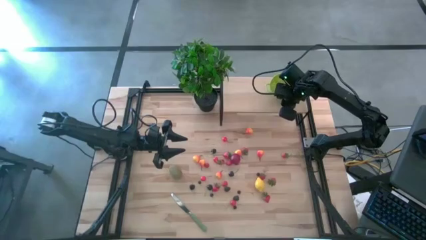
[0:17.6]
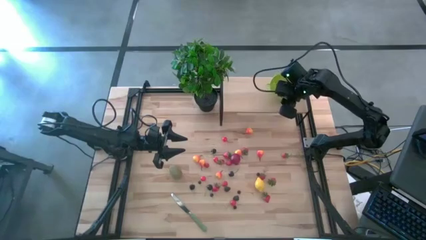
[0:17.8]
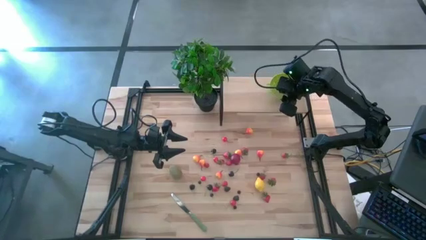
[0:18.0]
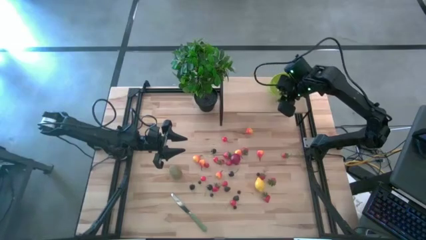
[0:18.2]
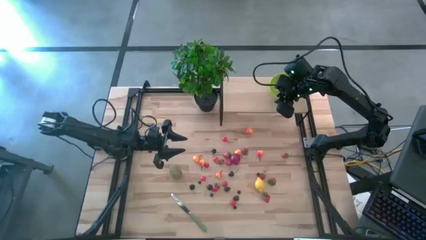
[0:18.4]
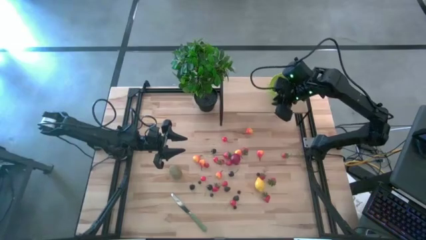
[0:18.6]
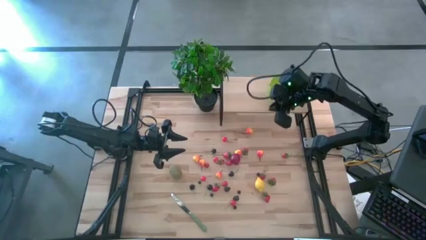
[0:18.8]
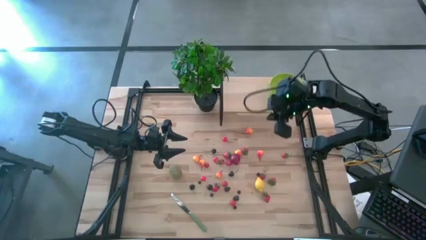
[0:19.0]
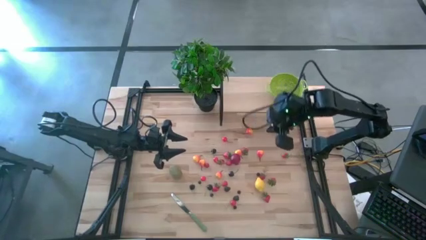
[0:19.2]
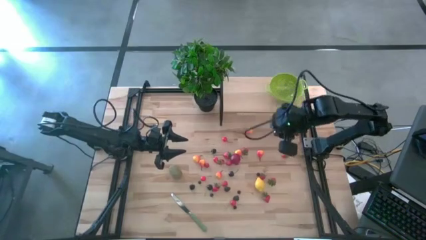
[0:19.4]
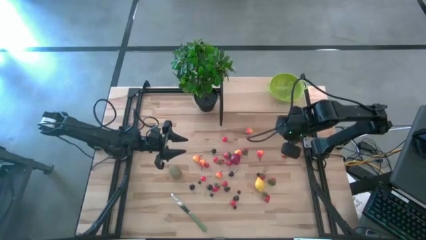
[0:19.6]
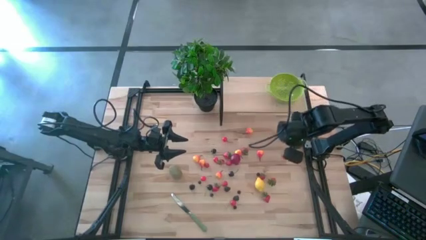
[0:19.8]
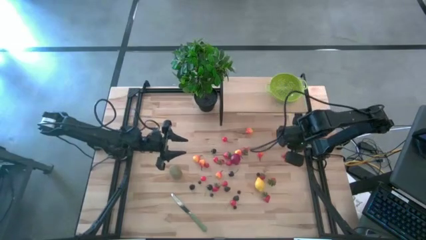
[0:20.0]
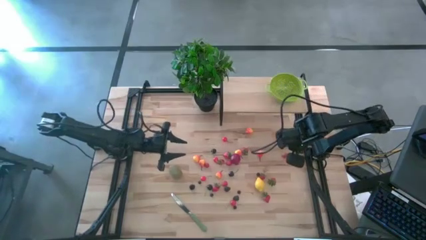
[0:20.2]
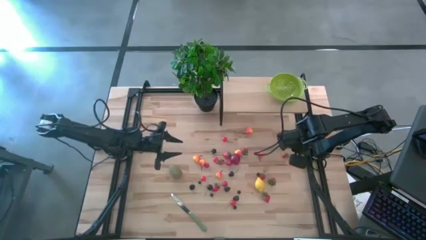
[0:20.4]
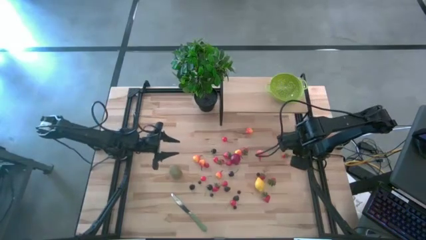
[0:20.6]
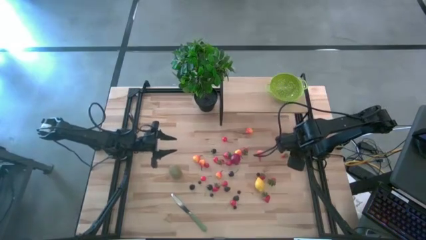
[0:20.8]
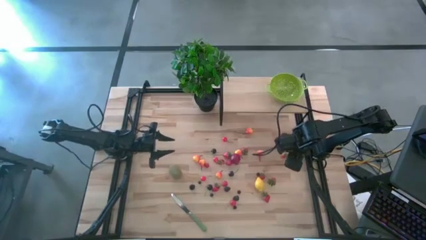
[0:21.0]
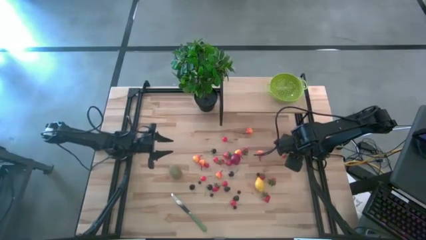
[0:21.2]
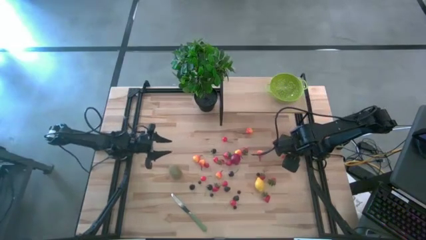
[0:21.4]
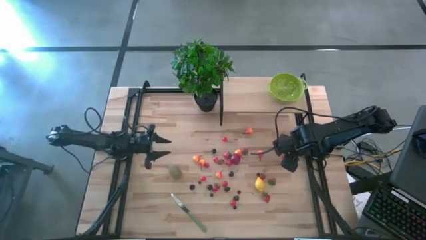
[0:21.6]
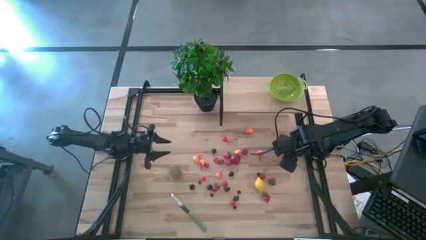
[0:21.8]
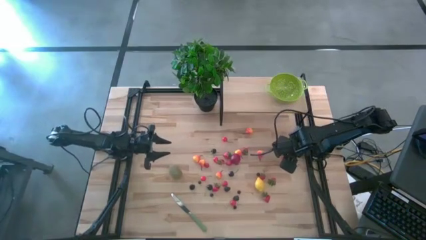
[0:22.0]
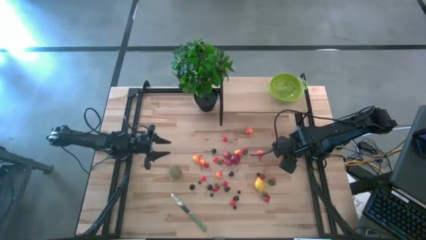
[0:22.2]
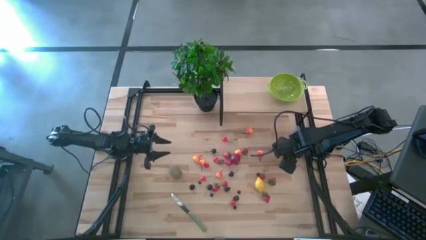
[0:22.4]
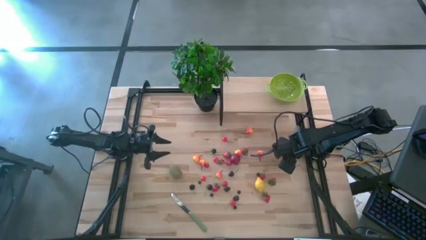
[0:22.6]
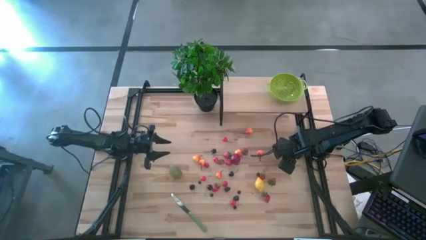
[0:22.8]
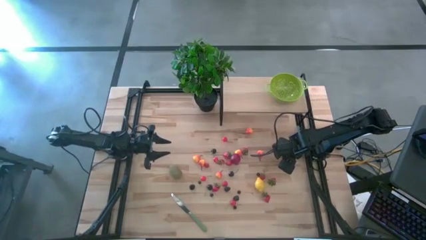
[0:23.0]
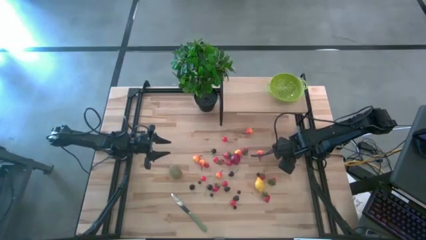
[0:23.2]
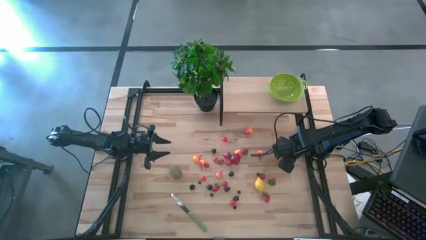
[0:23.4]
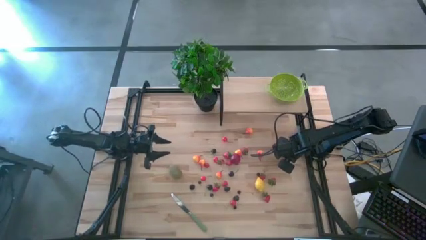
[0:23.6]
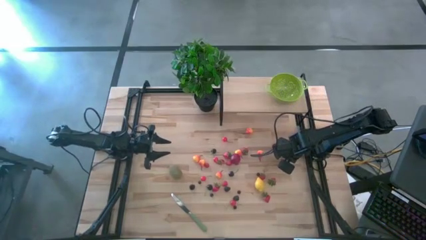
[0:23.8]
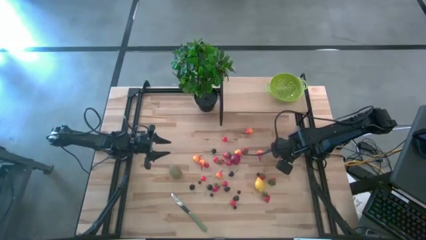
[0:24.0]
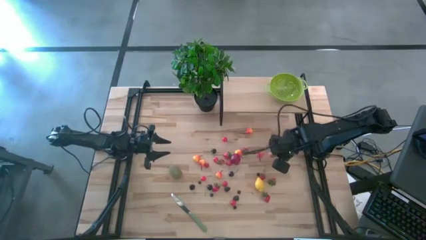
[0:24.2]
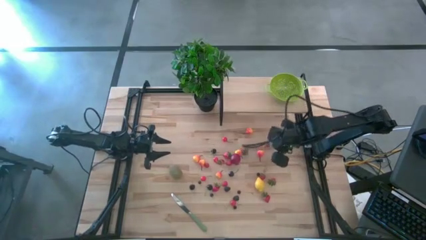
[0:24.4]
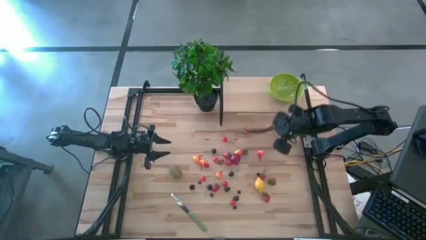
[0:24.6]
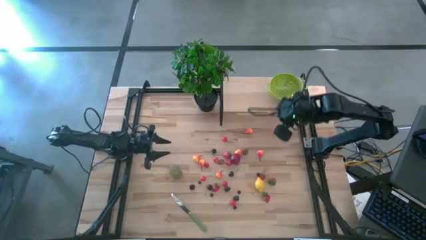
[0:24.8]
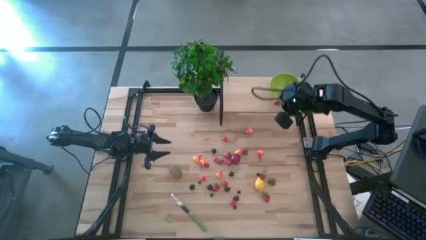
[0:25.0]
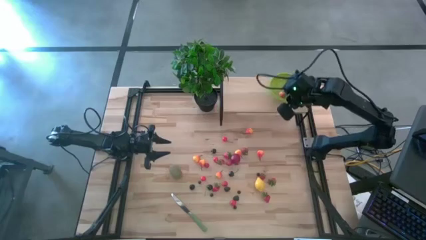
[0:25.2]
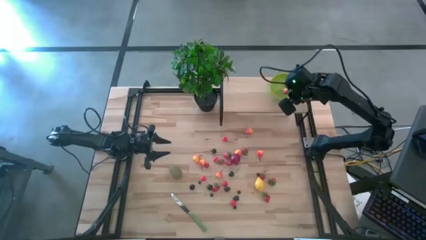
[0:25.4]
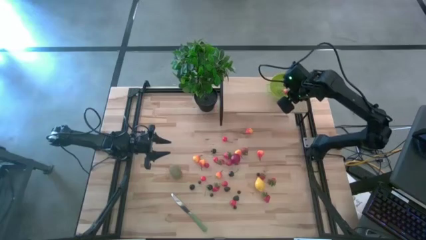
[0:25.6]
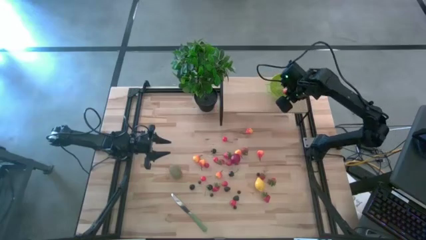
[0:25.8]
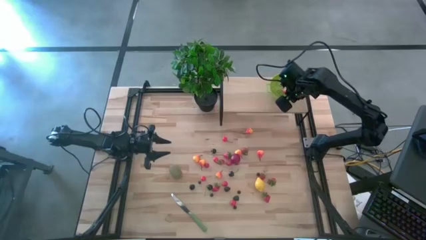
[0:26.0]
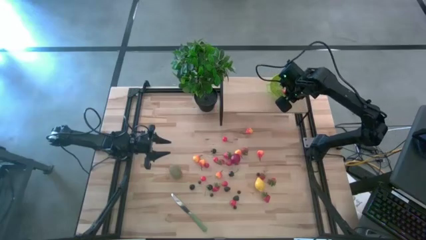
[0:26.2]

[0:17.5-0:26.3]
Task: Pick & Place Fruit
Put the strawberry into the green strainer bowl on the shelf
